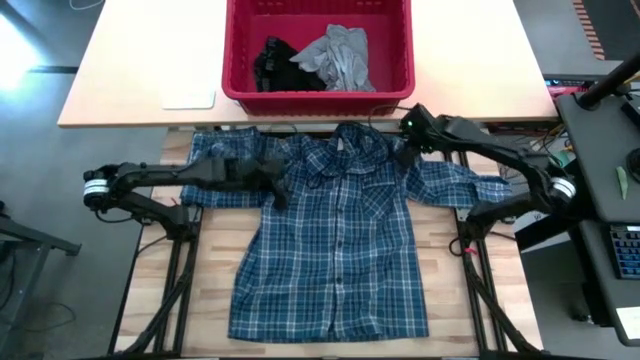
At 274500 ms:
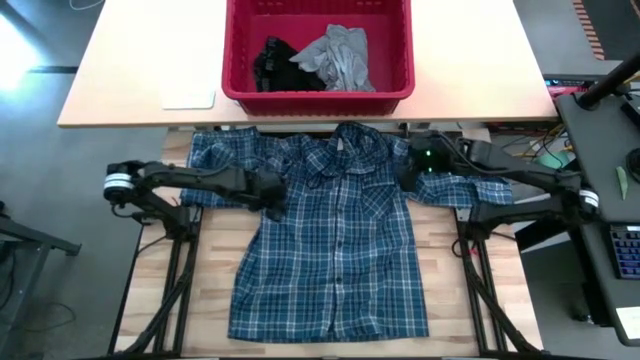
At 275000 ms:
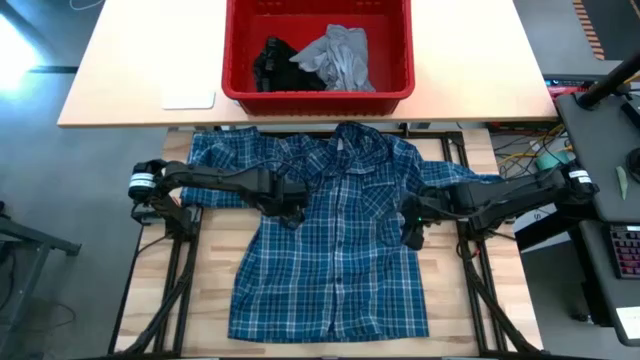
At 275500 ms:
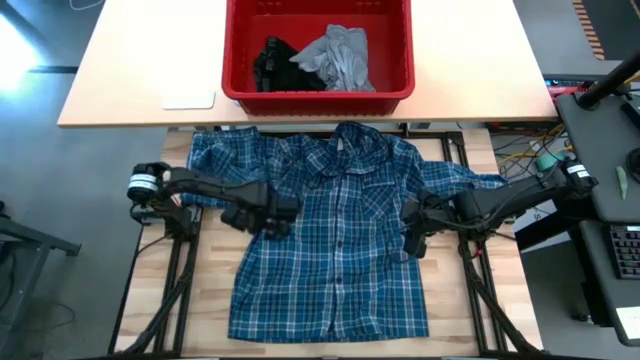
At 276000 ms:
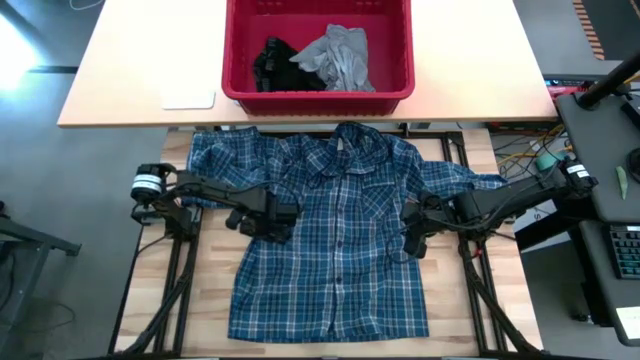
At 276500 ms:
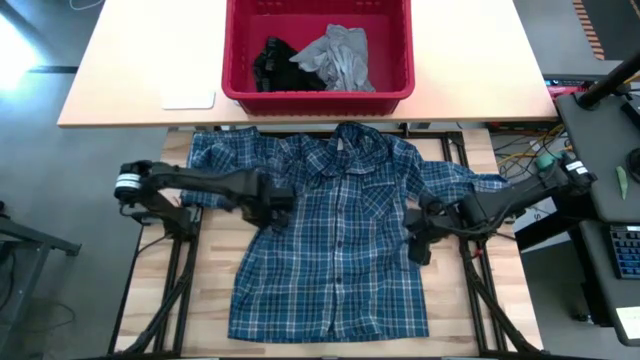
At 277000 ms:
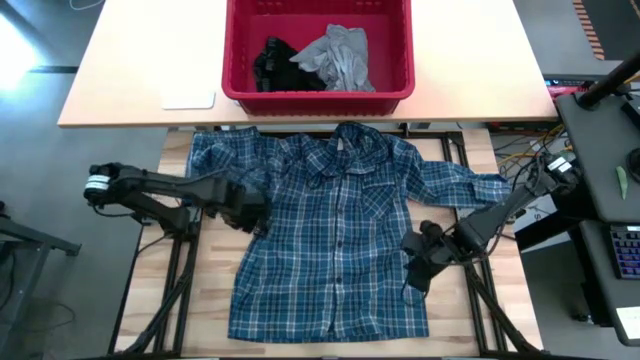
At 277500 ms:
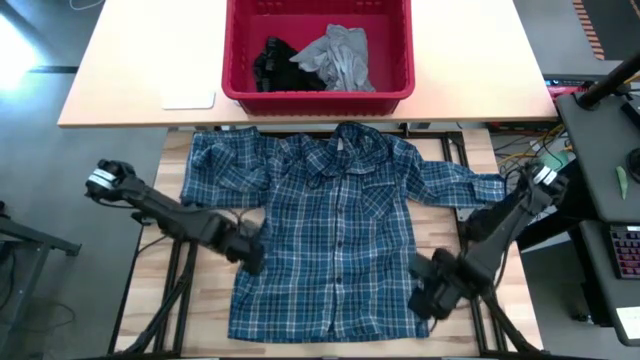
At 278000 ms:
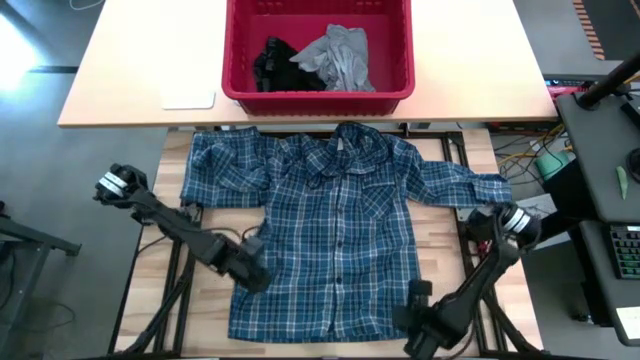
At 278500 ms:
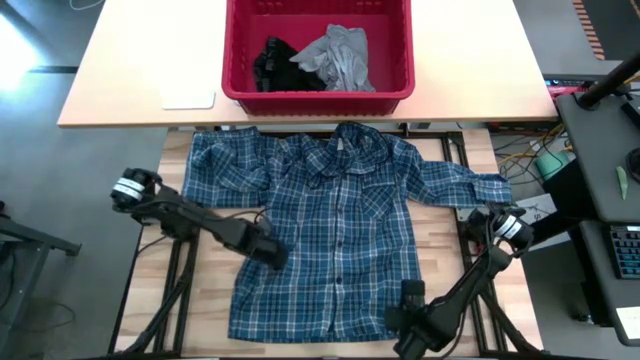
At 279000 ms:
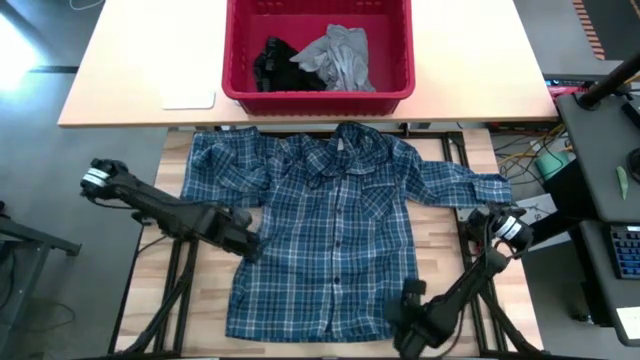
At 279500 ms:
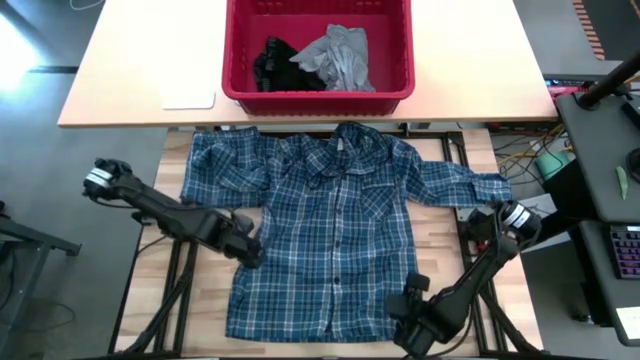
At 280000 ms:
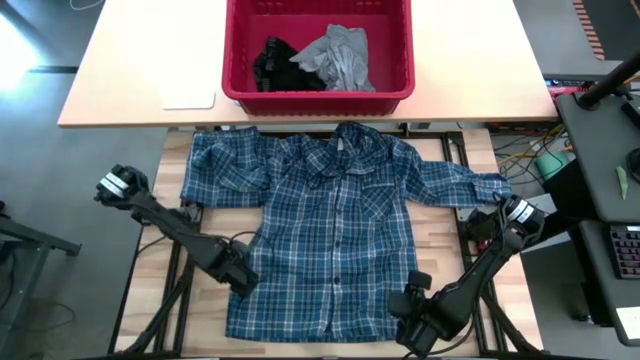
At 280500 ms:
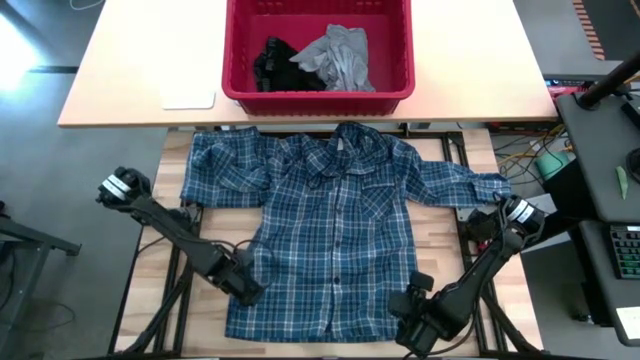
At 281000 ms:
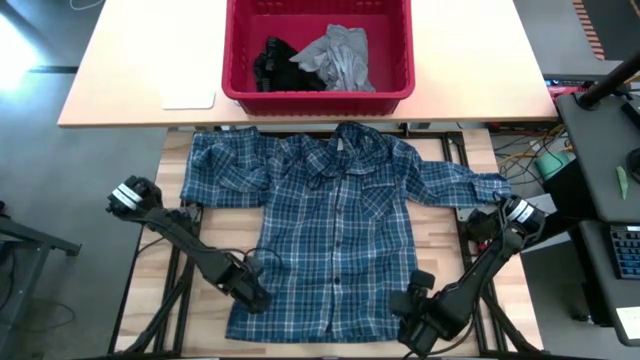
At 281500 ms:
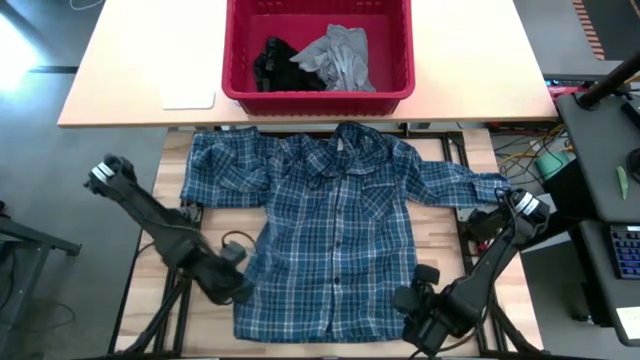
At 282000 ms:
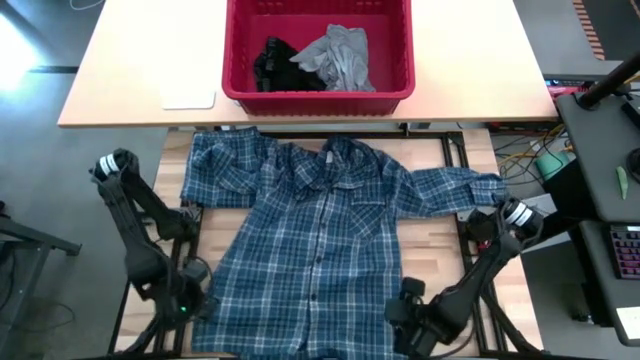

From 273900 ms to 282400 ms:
Task: Fold Laundry from Bin
Fold the blue patterned long sleeve shirt

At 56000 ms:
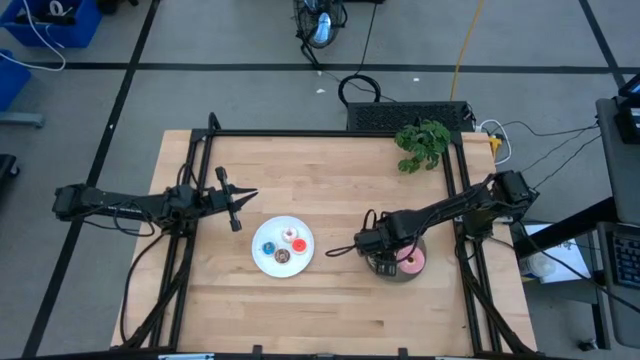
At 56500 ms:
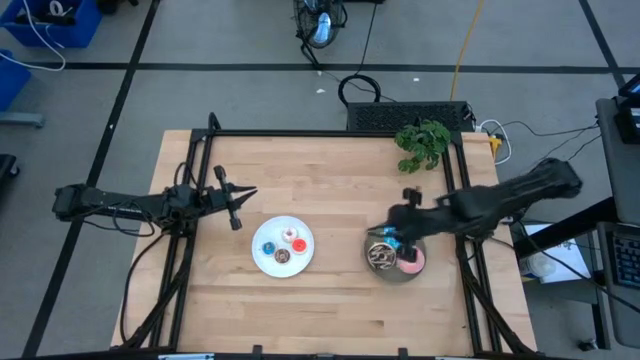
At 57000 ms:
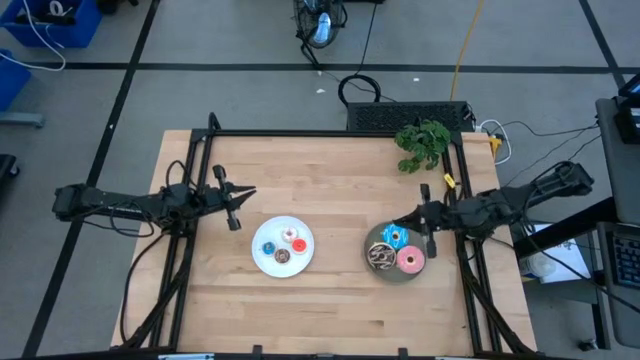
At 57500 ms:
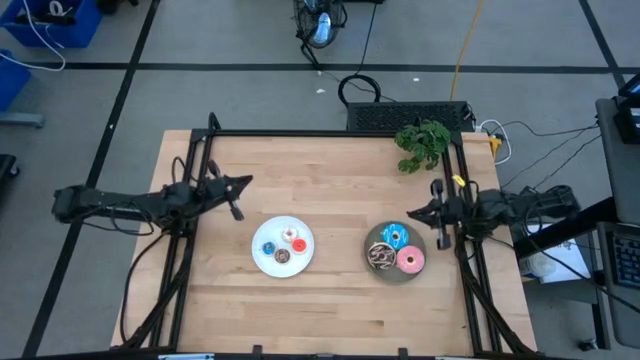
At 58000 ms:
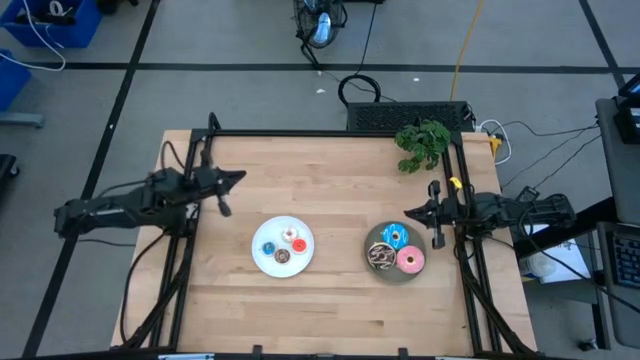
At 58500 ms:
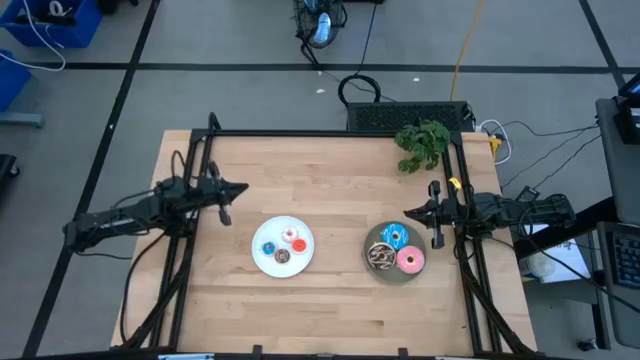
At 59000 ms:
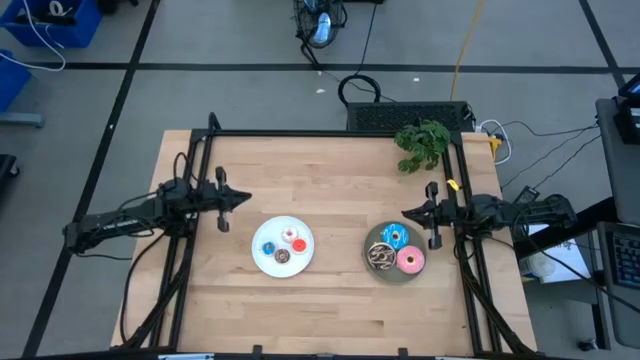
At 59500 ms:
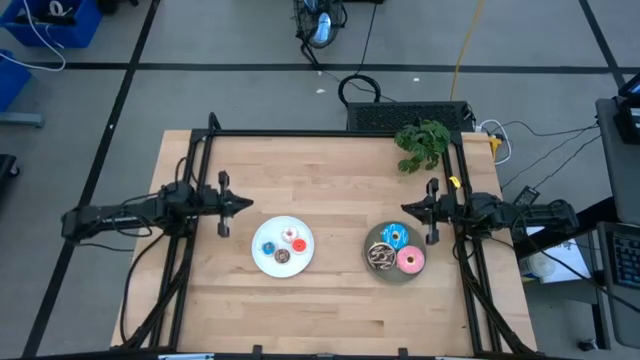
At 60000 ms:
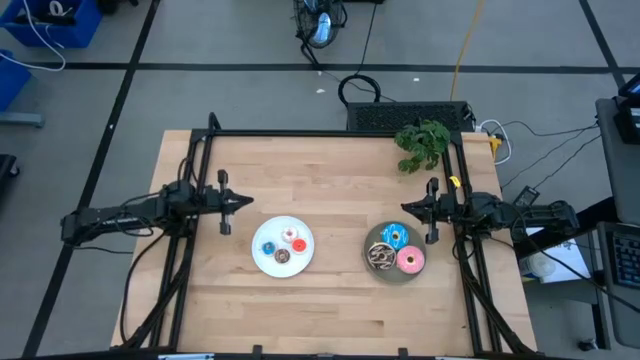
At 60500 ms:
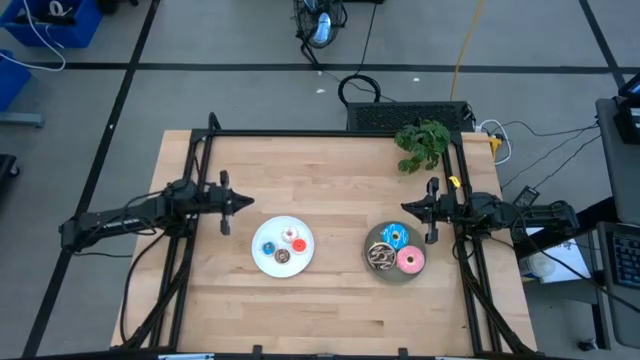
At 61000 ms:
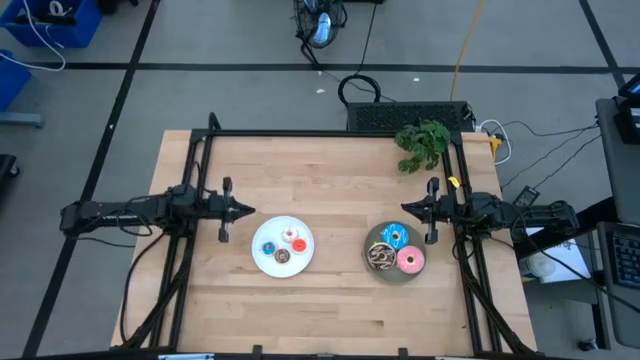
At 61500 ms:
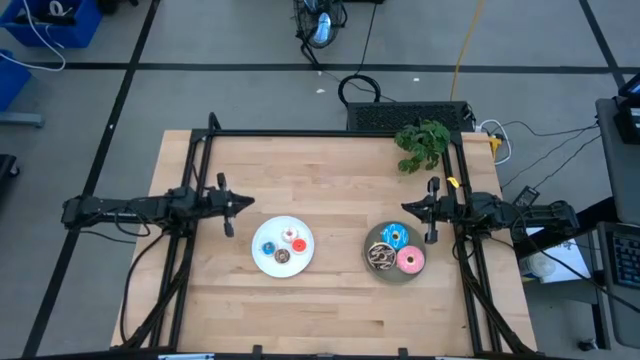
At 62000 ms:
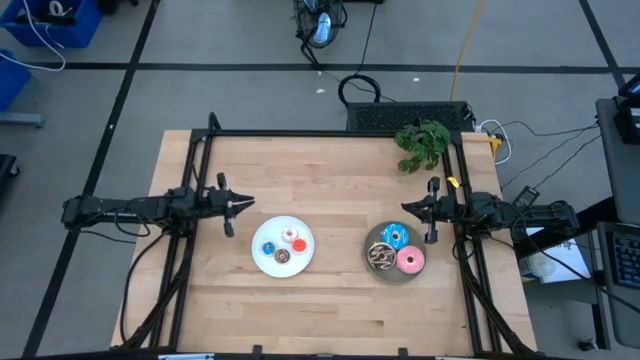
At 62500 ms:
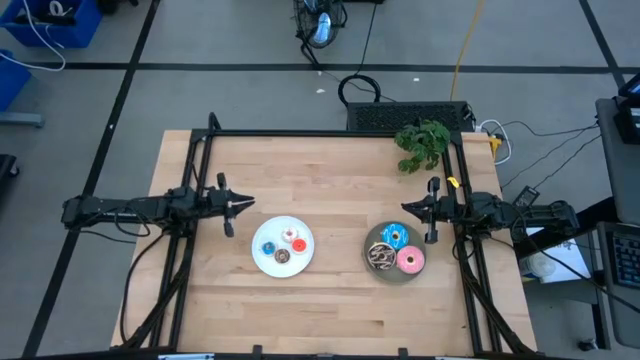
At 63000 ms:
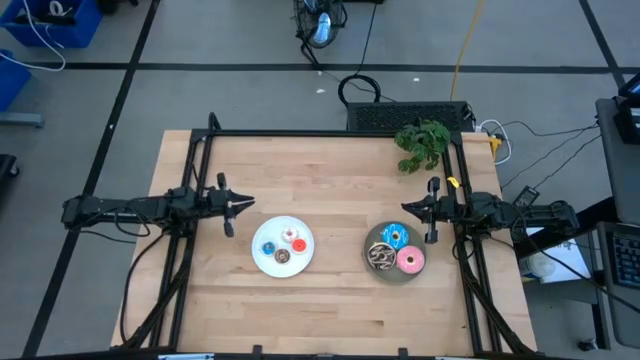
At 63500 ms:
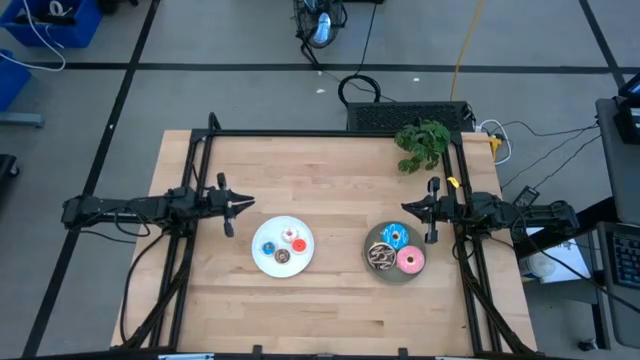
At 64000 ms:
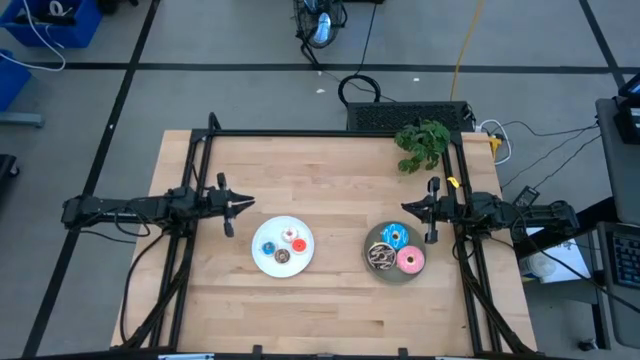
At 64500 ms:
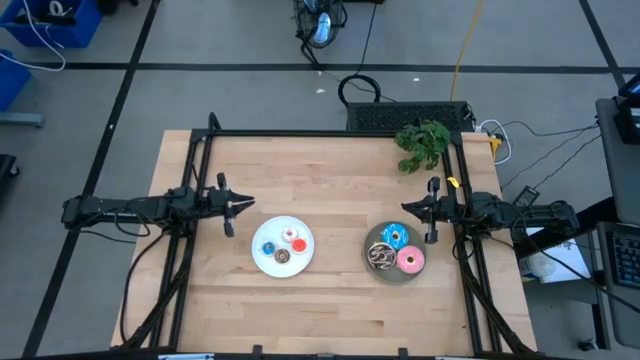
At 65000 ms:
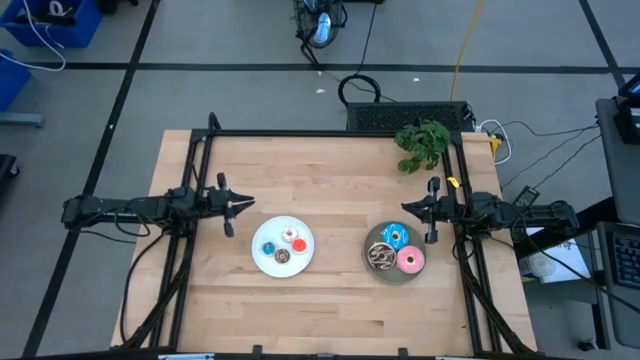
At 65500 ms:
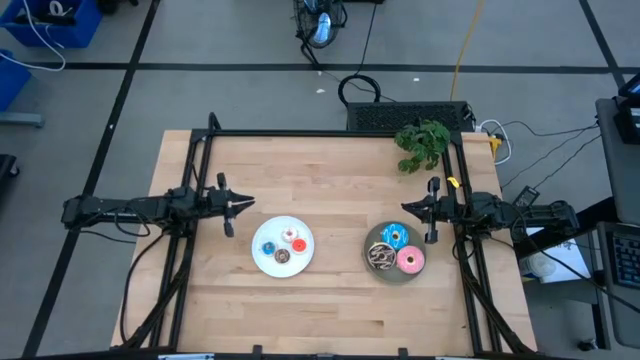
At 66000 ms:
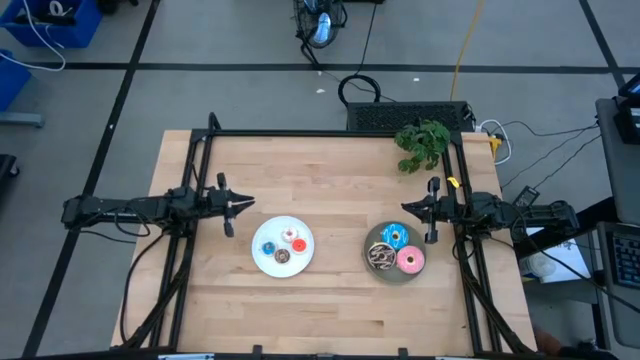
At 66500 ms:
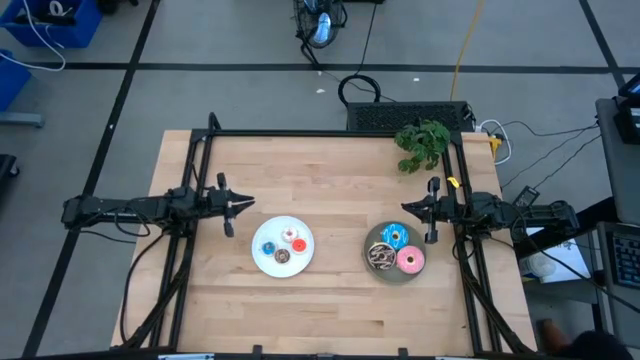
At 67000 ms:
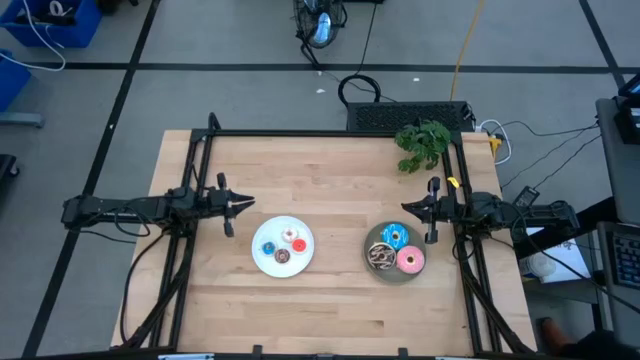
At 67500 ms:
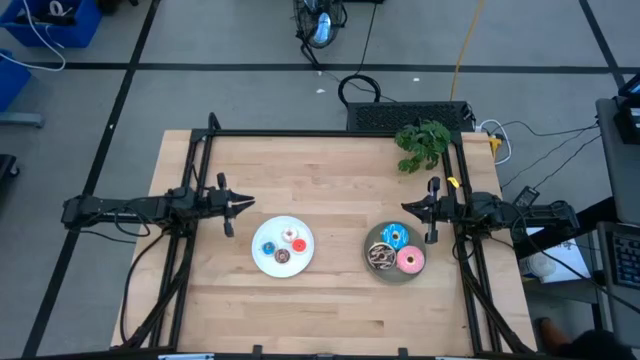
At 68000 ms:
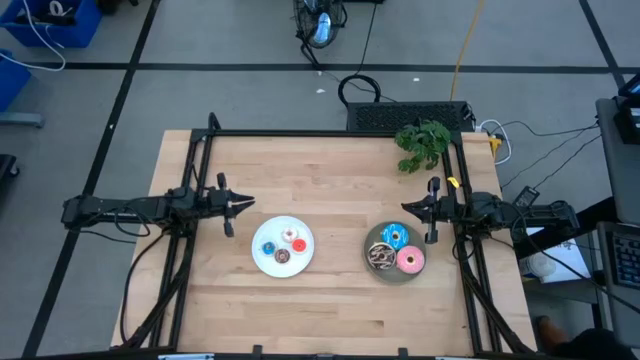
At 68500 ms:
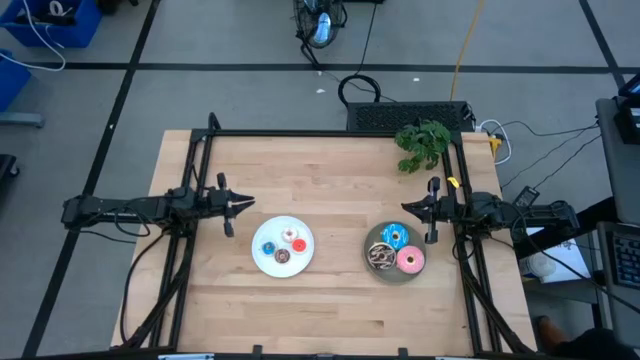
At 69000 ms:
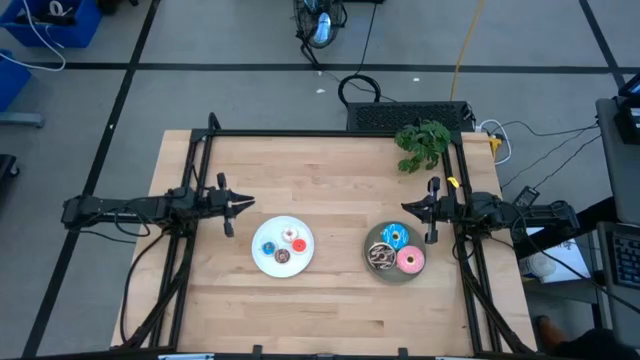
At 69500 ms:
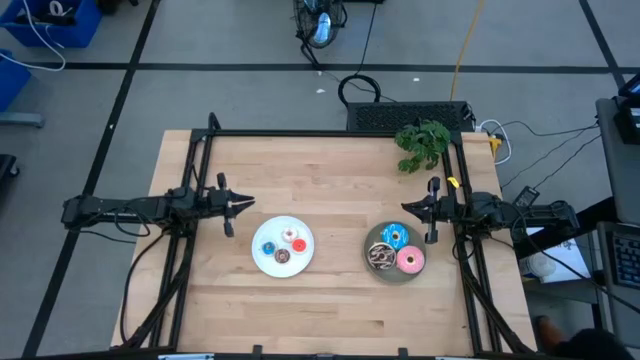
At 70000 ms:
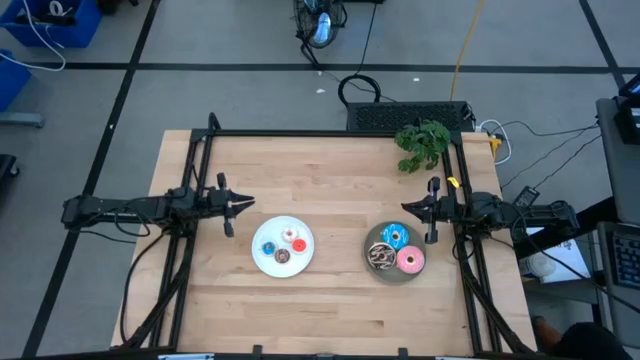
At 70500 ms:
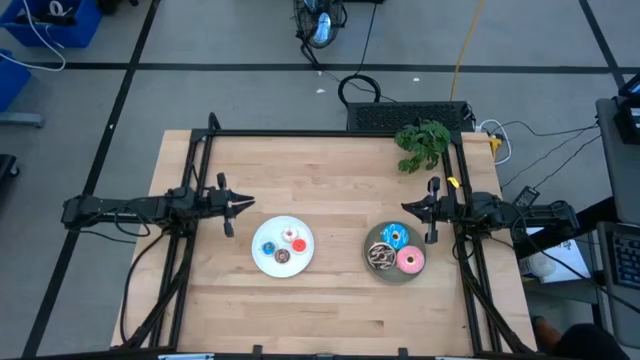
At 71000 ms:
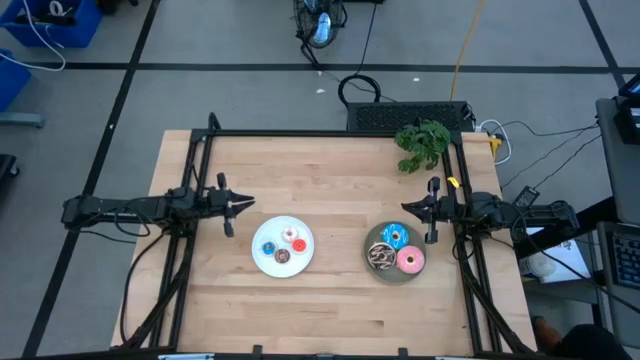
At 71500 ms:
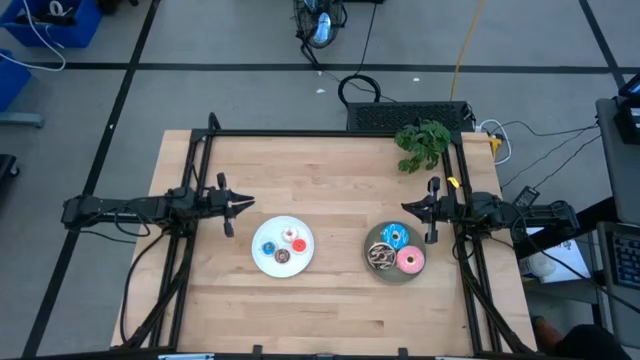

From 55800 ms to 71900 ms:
Task: Pick & Place donuts
Return to Home Position
